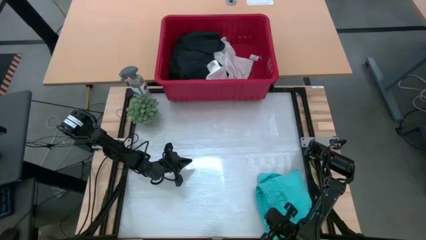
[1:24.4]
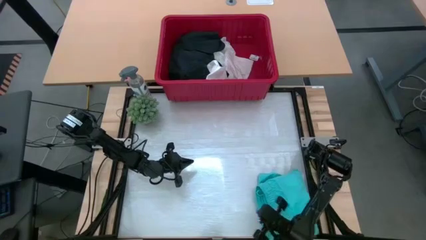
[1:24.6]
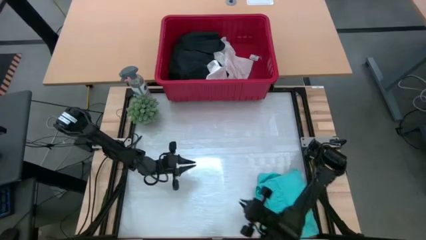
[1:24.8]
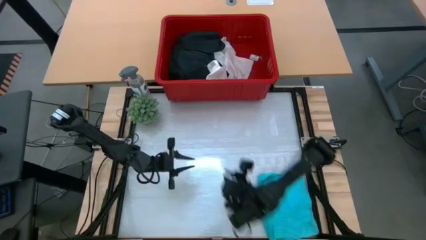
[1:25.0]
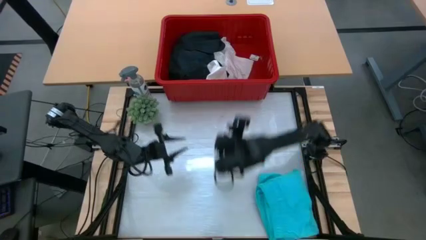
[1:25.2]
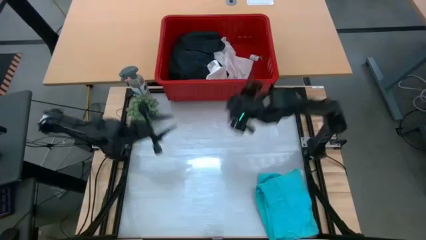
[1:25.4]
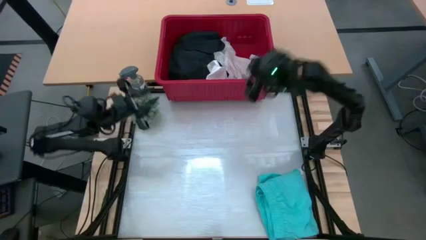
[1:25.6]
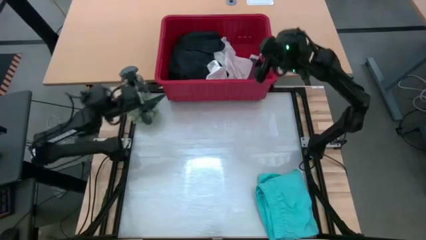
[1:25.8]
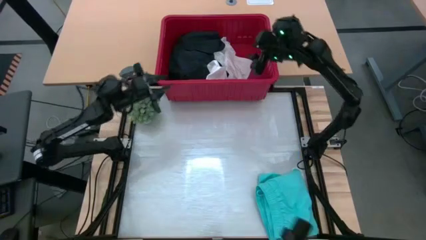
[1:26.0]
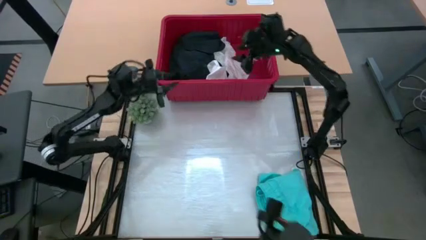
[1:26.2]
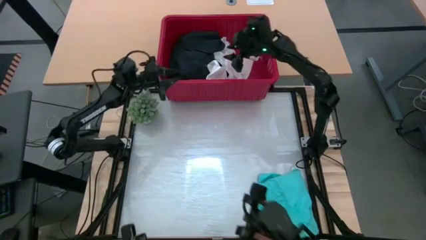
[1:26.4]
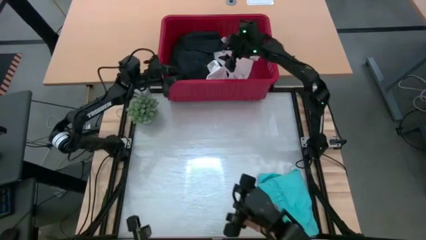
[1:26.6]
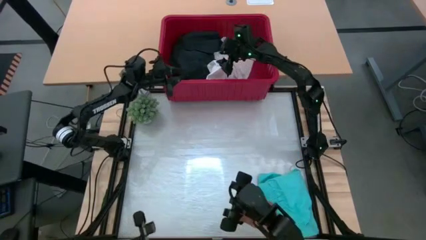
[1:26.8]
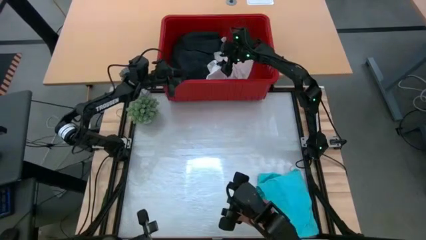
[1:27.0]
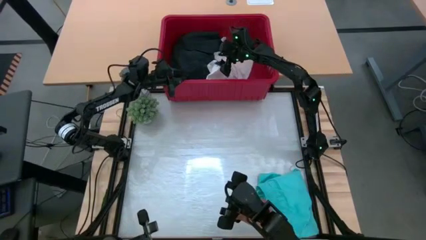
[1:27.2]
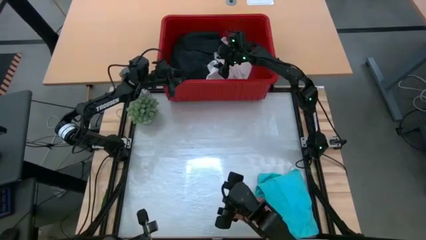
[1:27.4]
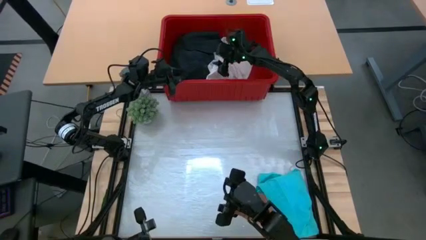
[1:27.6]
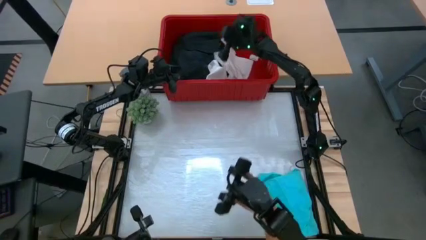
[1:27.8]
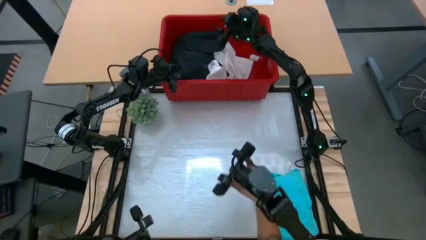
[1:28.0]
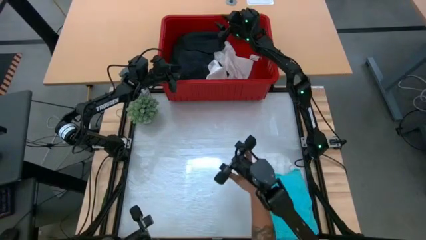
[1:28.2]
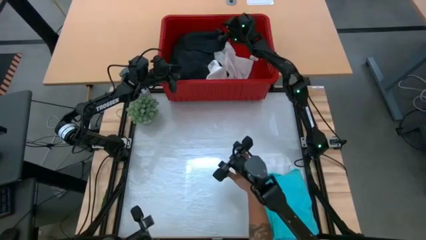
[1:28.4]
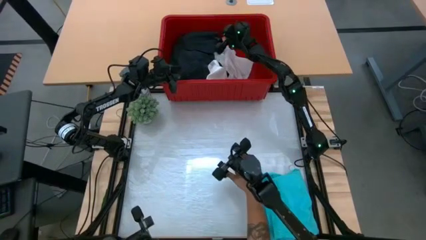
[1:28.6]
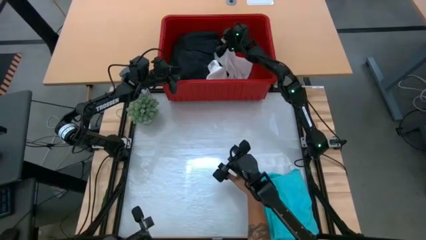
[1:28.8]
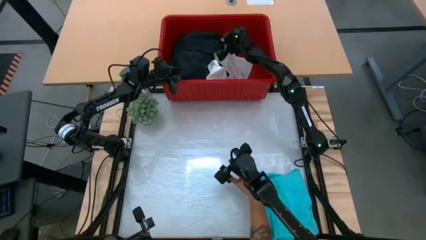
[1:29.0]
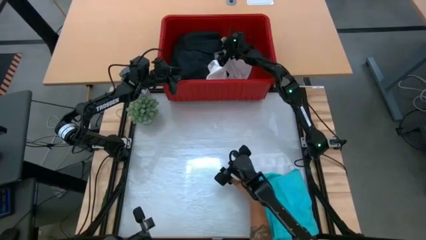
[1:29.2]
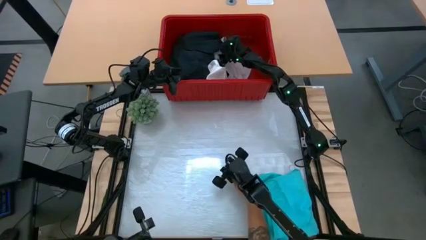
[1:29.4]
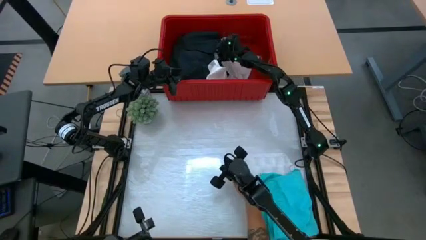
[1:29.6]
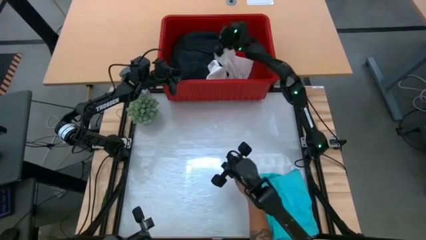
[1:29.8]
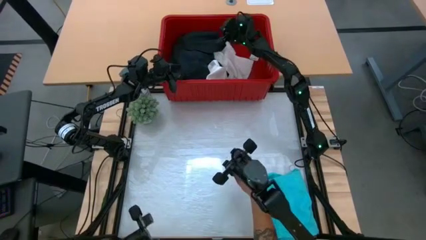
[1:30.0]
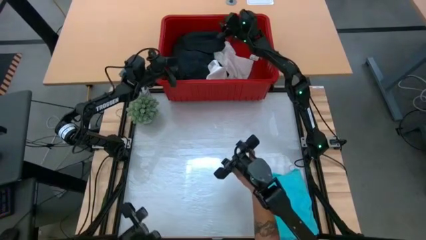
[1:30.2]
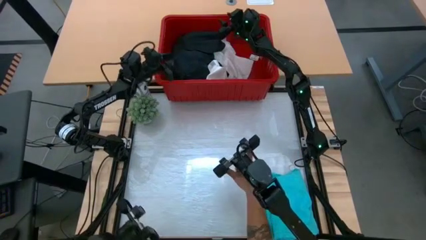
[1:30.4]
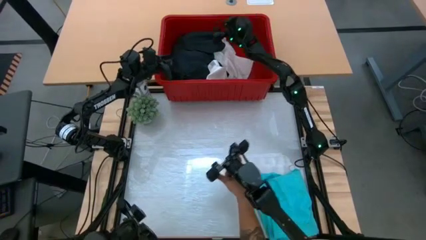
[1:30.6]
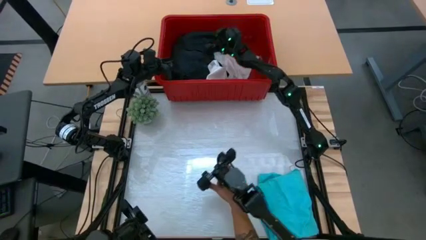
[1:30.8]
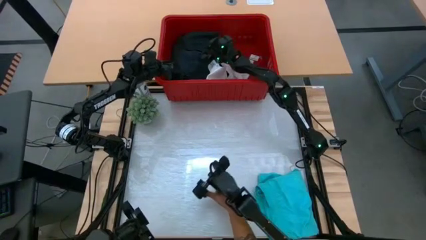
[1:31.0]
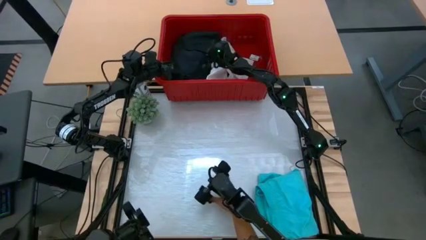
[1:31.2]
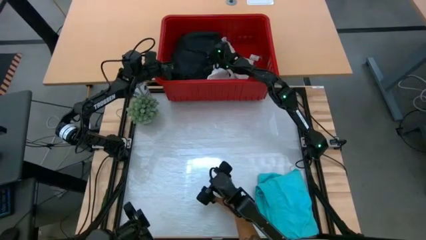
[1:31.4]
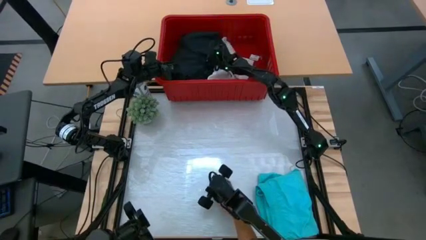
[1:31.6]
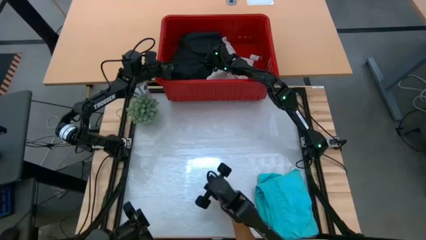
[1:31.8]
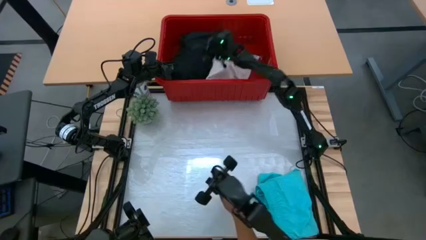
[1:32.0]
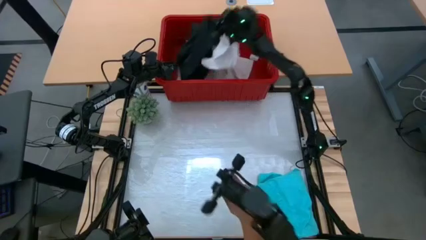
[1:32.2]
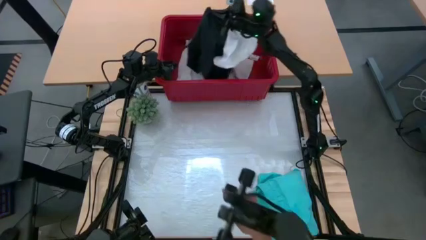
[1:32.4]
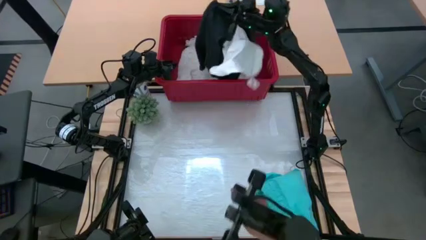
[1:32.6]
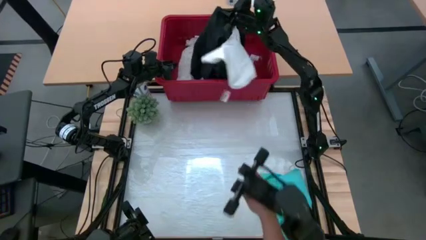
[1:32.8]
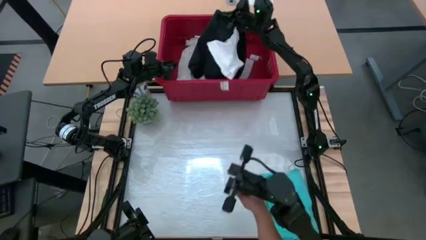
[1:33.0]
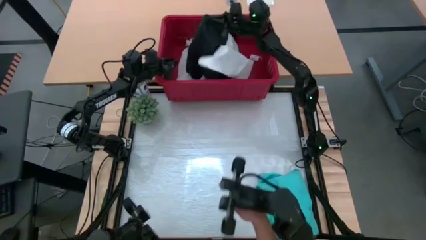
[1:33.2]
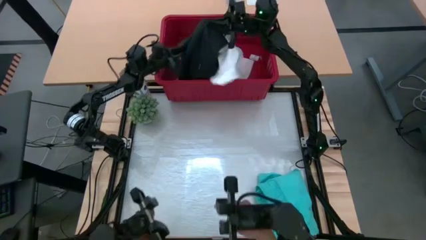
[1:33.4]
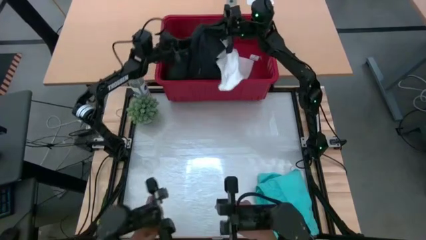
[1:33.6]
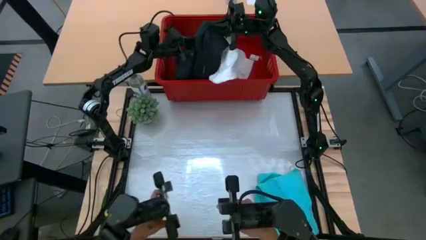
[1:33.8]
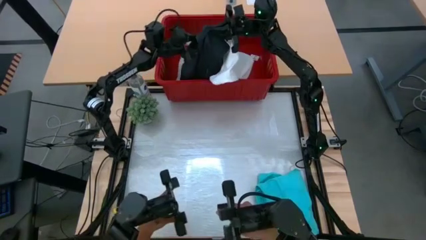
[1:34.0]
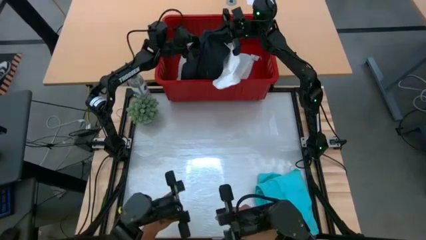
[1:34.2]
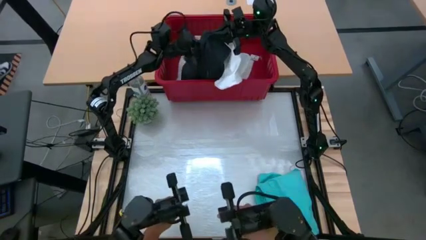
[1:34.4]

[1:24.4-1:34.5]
Task: Fold Laundry from Bin
Fold the black shorts

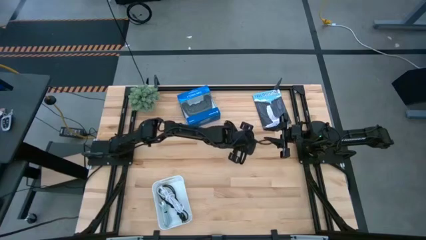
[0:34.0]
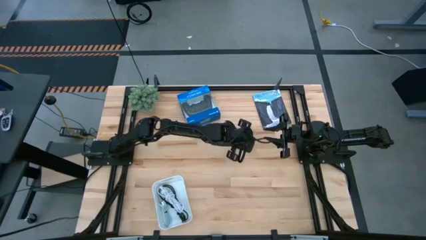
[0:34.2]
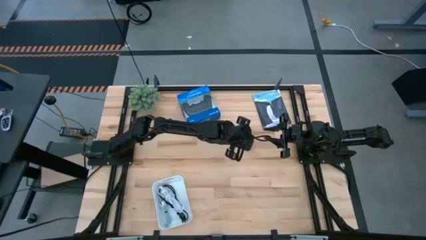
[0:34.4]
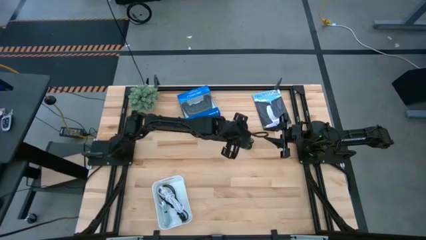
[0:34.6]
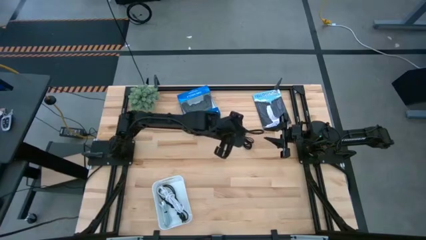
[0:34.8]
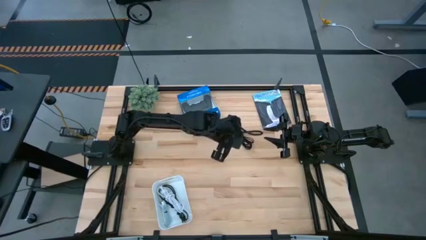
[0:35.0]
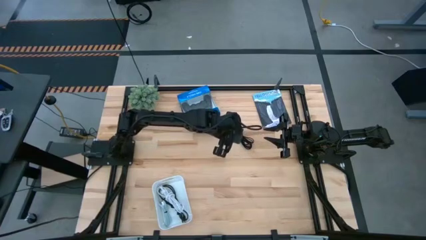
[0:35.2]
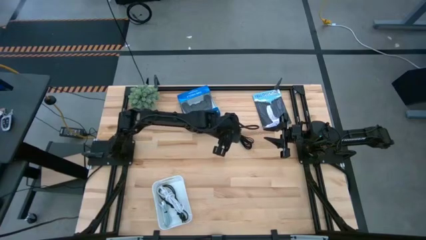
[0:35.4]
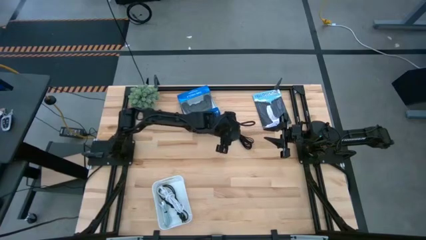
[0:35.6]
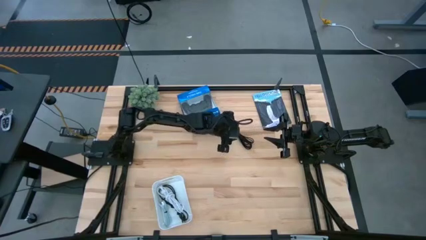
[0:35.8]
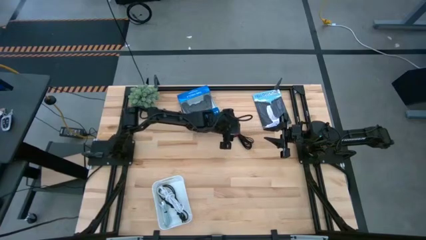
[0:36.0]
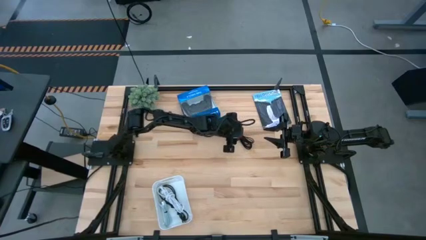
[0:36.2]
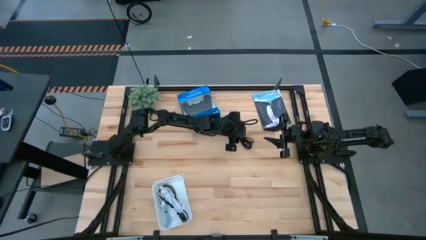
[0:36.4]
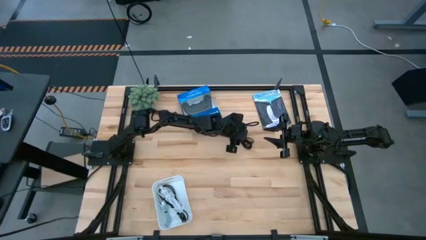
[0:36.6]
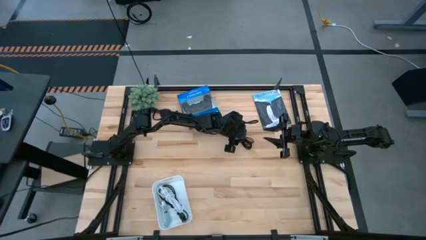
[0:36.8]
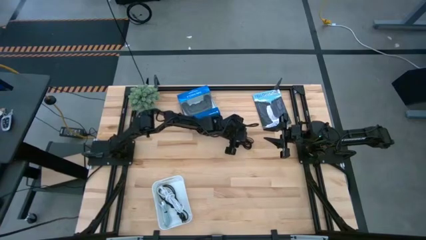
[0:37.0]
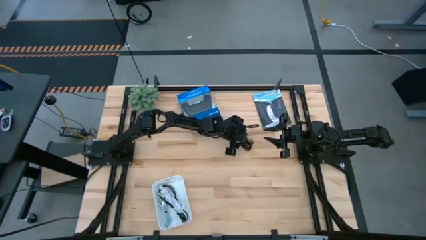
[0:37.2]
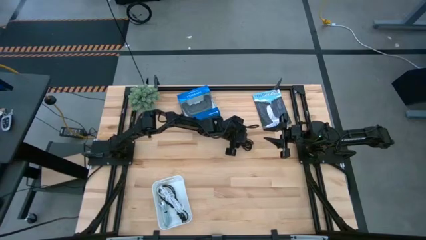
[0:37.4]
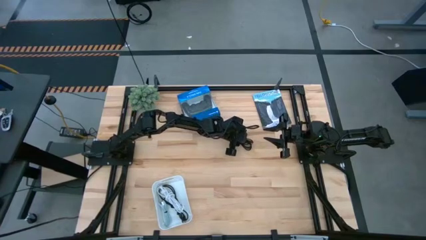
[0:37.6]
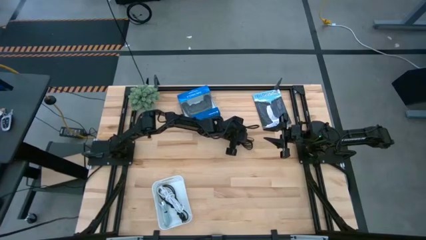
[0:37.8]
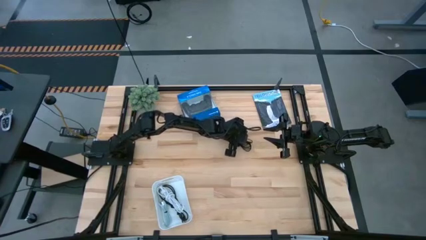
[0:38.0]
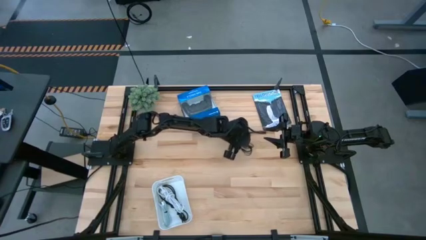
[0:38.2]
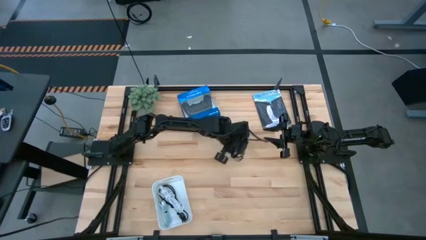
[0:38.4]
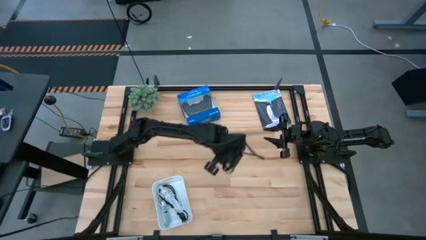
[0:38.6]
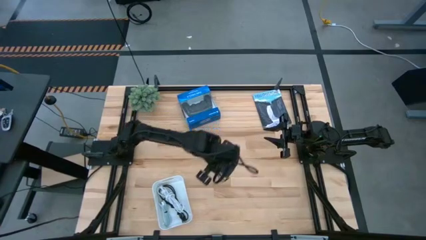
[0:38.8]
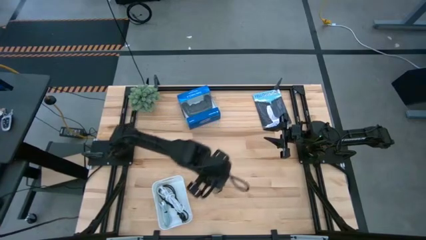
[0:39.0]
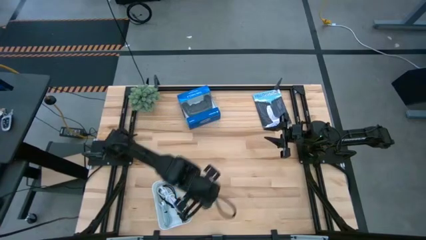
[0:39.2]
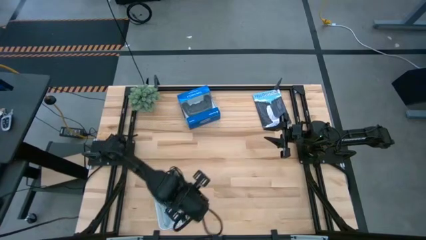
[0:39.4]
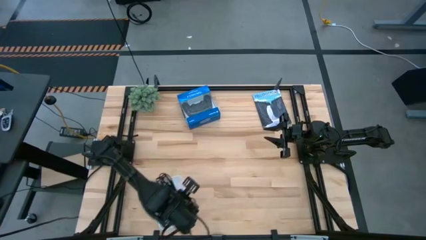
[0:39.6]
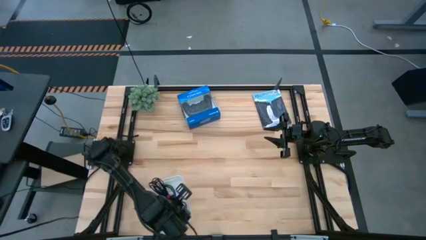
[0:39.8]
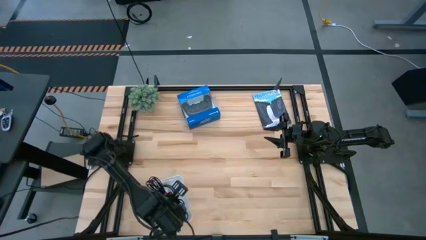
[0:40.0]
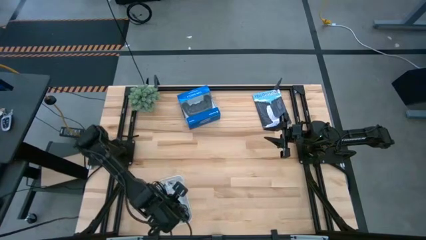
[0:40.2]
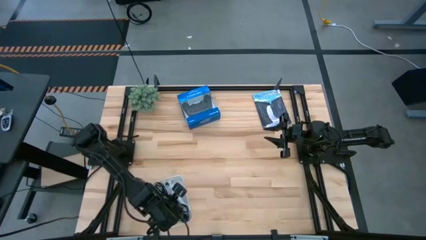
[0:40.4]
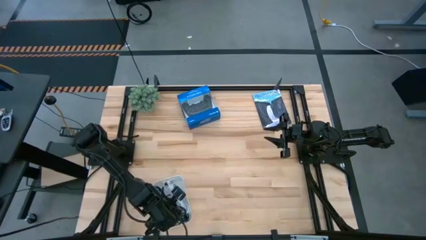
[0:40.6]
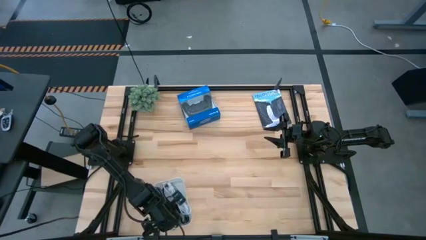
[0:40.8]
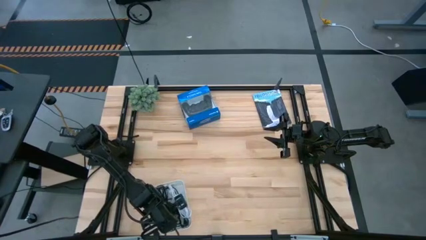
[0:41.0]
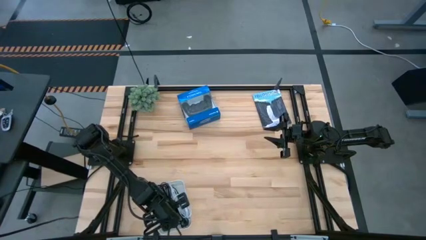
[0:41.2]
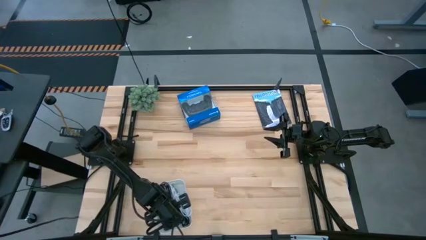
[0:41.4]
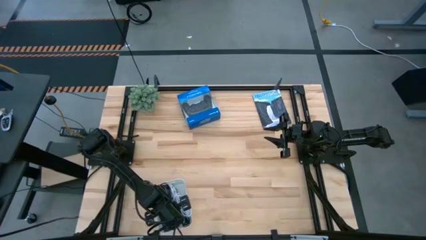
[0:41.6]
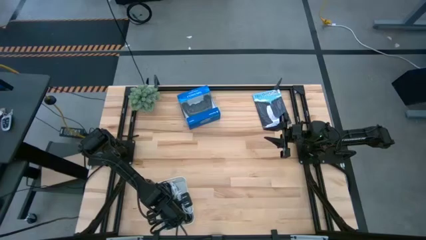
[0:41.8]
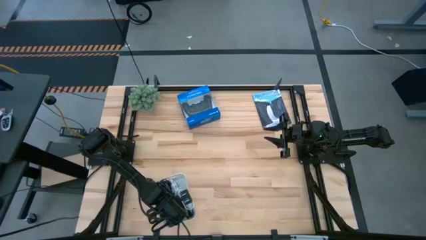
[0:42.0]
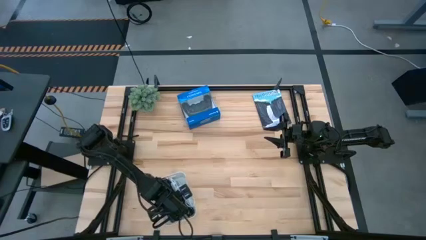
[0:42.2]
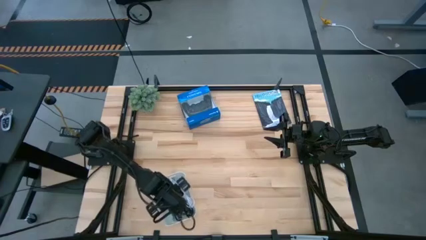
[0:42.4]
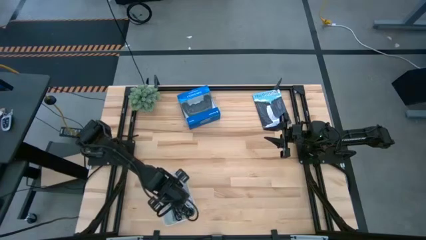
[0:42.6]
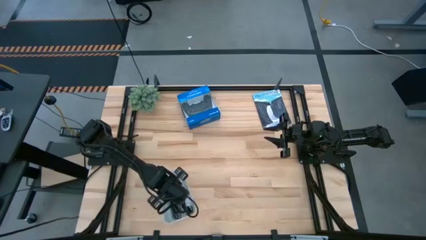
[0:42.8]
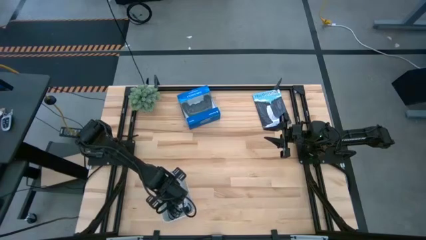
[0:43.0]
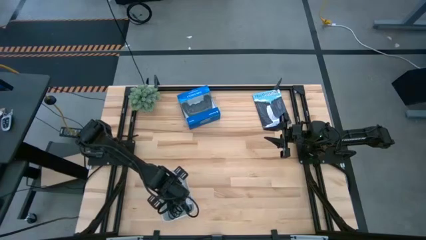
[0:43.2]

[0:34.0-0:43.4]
Task: Pick and place USB-C Cables
Put the black charger cable into the white bin
